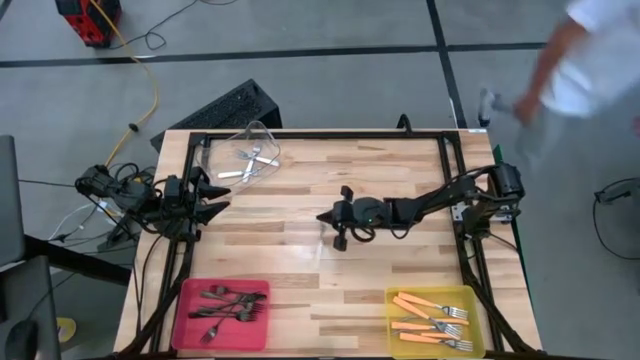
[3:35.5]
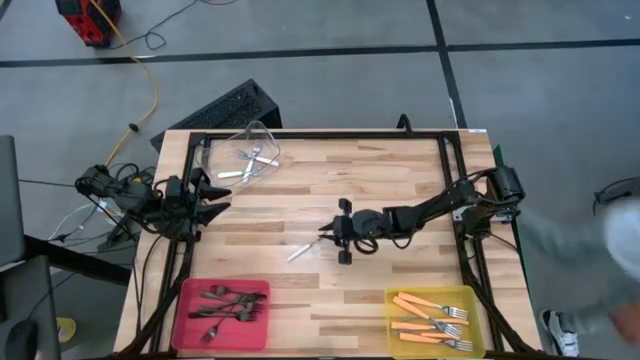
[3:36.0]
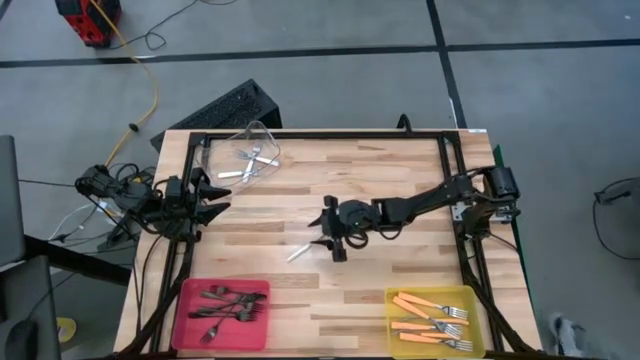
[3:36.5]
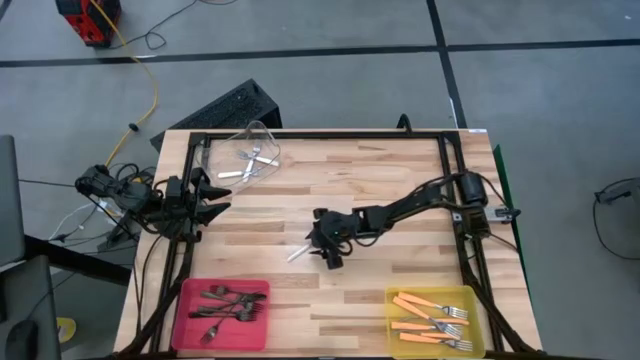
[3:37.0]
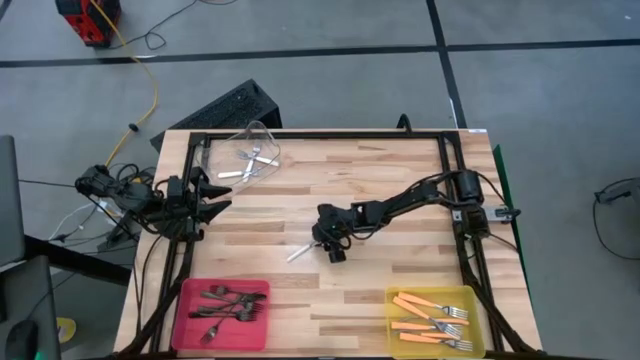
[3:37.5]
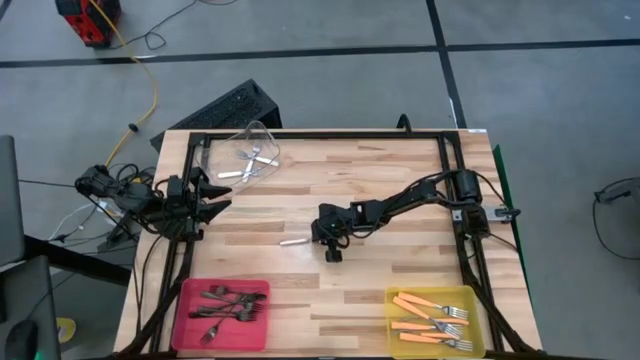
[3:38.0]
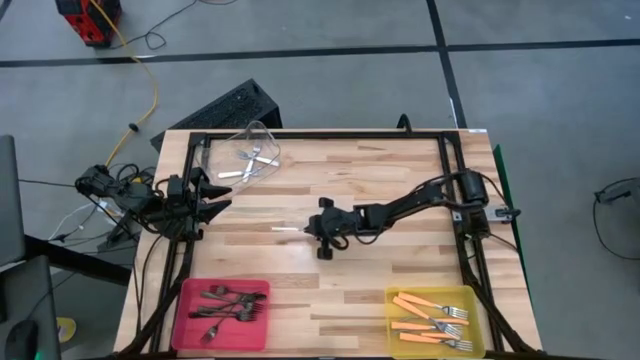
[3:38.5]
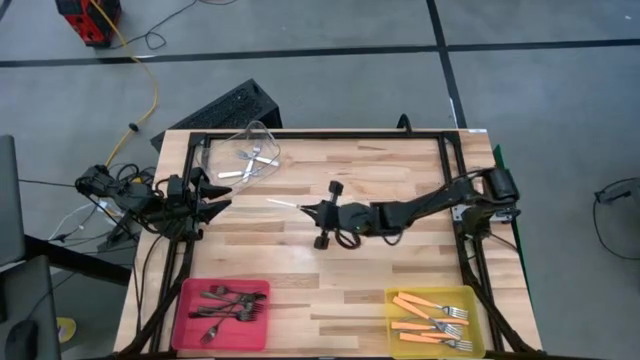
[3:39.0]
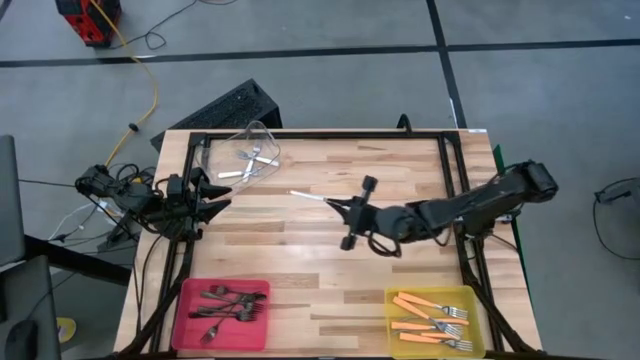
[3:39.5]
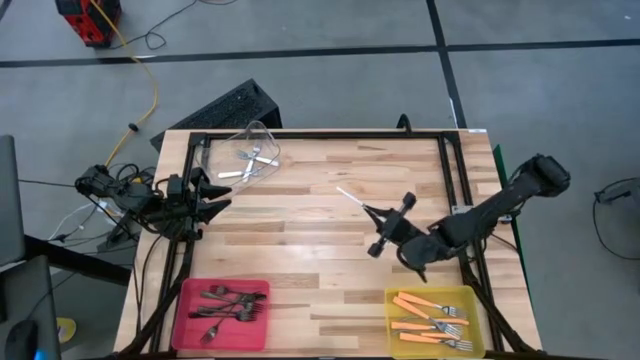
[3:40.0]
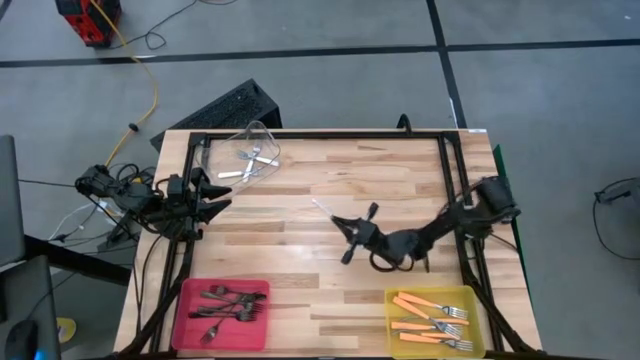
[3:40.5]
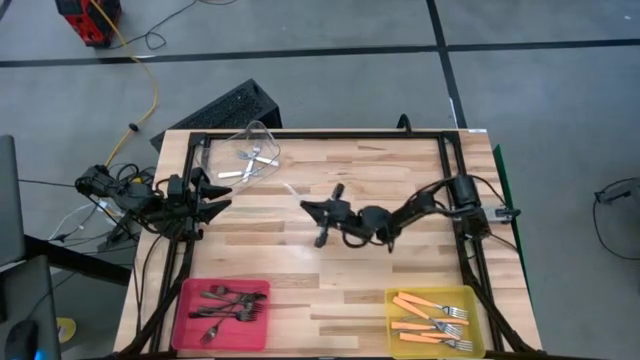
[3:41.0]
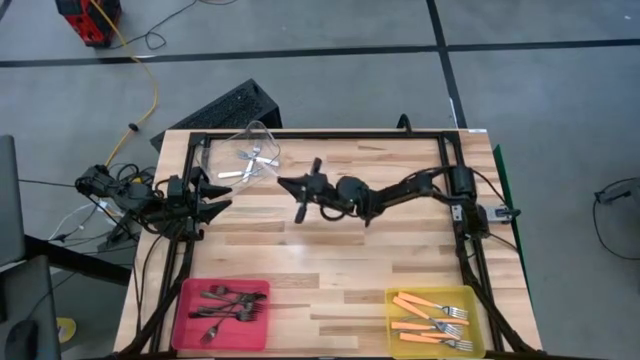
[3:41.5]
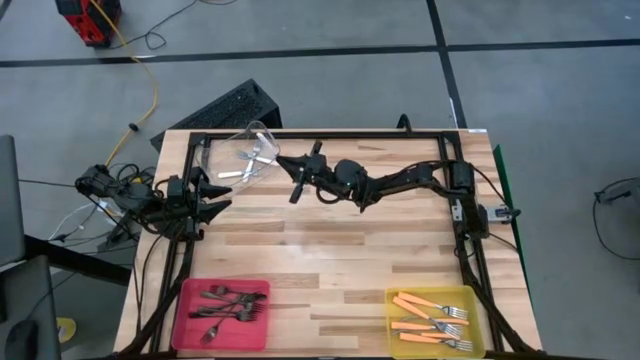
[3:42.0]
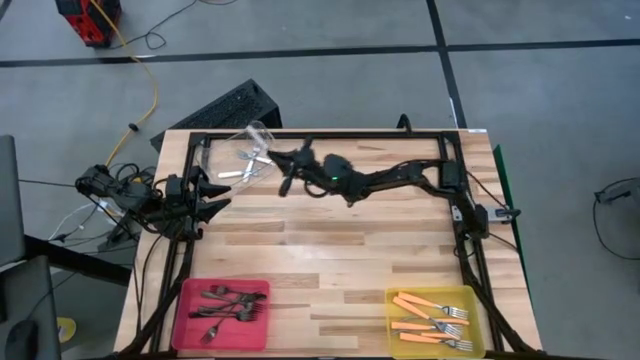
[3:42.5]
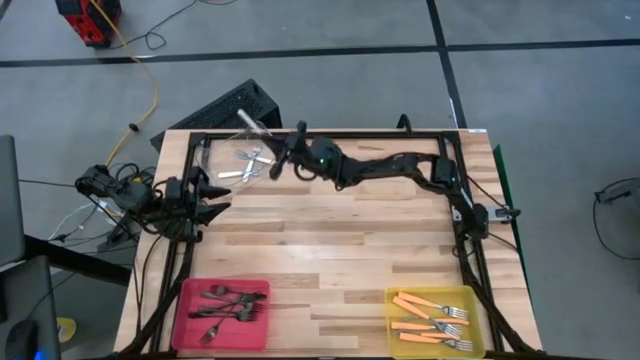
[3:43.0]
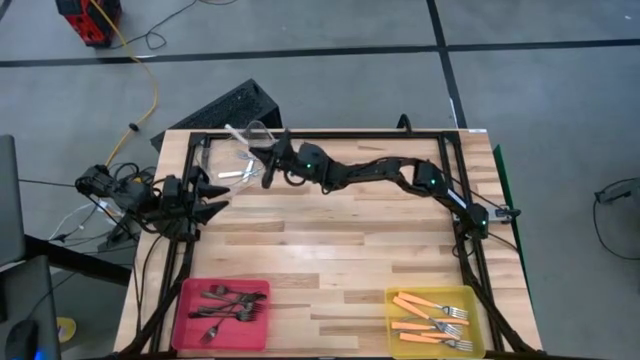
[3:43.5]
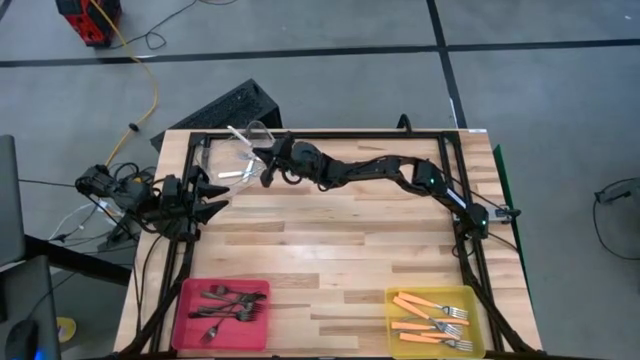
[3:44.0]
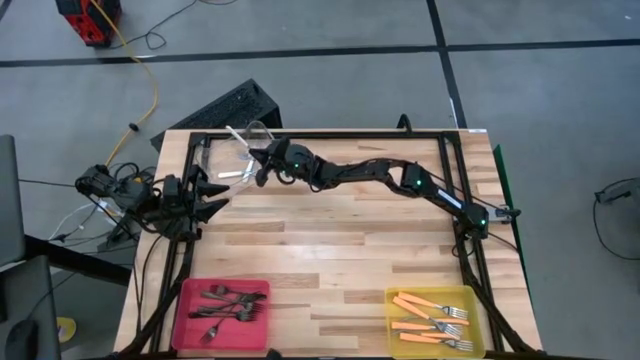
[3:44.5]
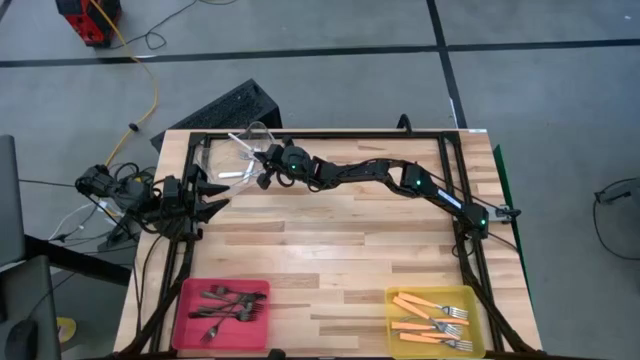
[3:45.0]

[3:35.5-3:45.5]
Task: Sort silverware by color (type)
Put the white fork into the transparent bin

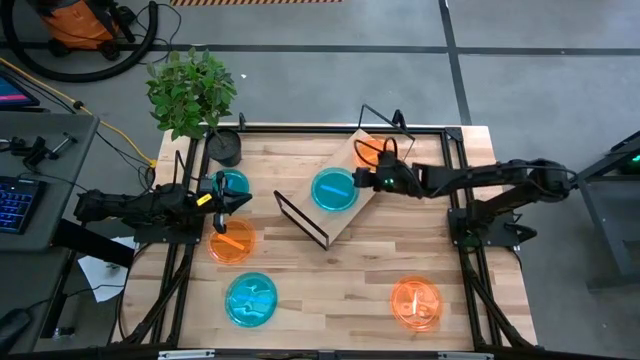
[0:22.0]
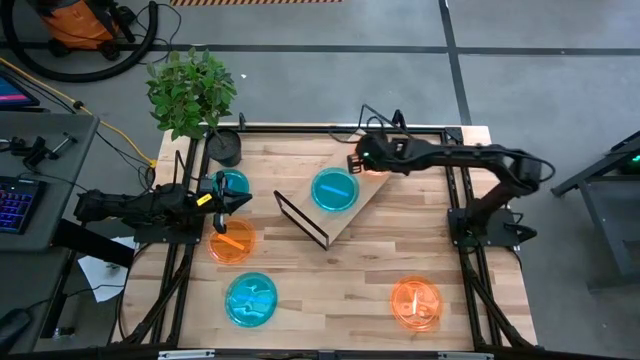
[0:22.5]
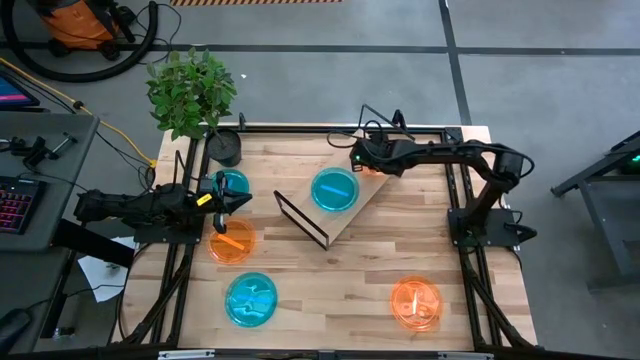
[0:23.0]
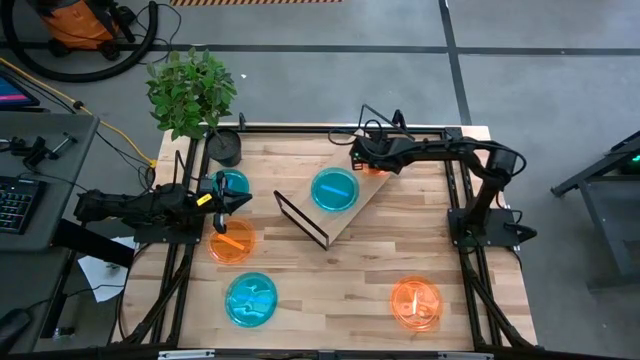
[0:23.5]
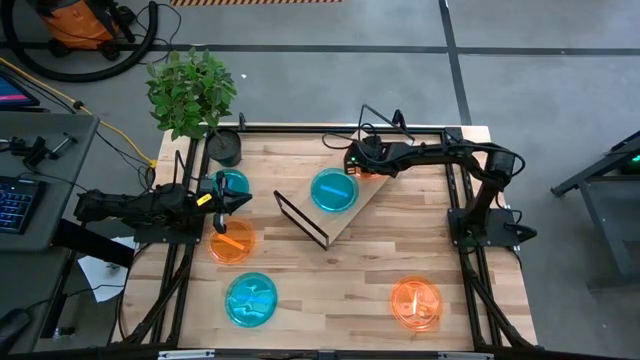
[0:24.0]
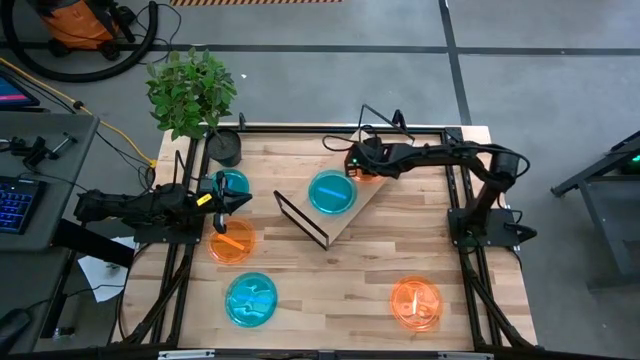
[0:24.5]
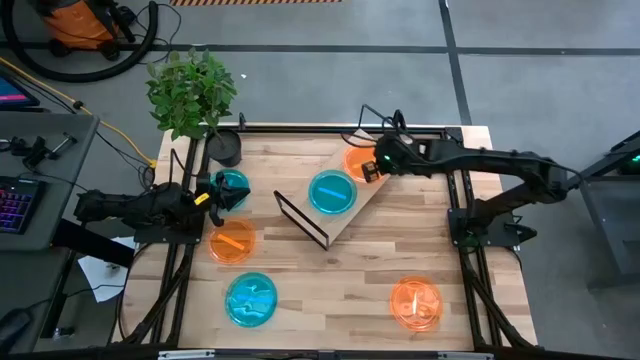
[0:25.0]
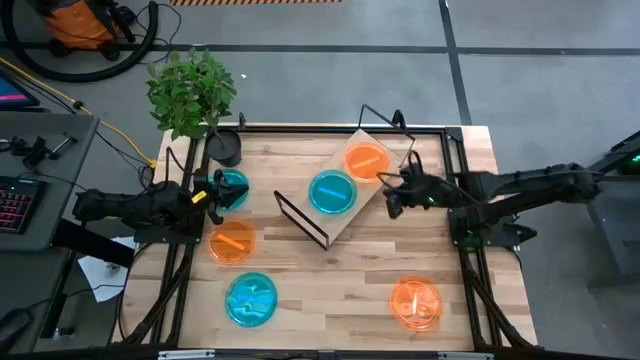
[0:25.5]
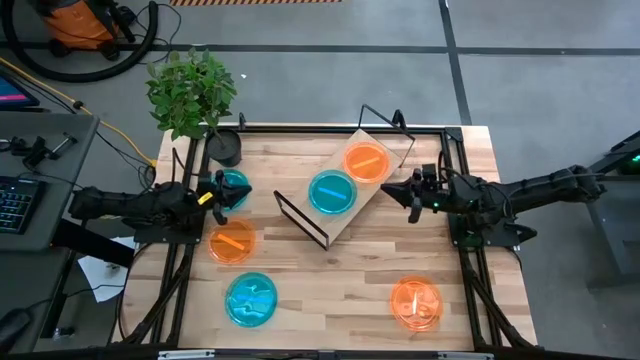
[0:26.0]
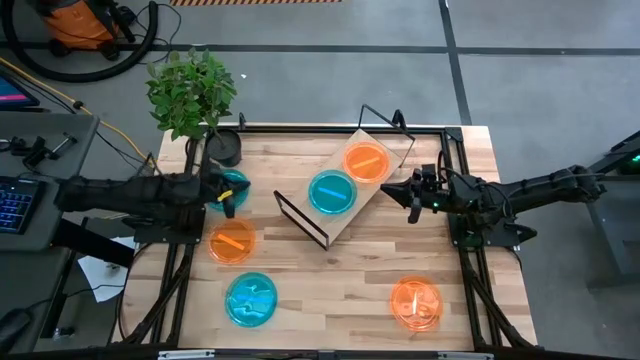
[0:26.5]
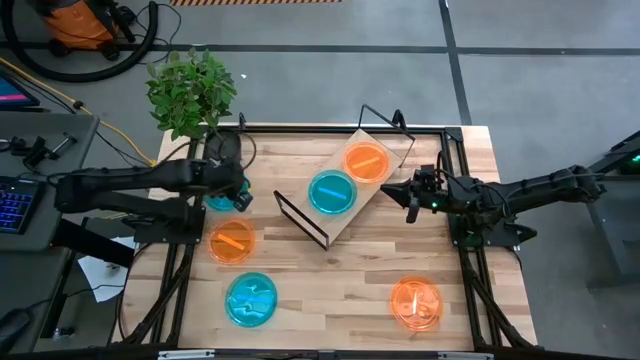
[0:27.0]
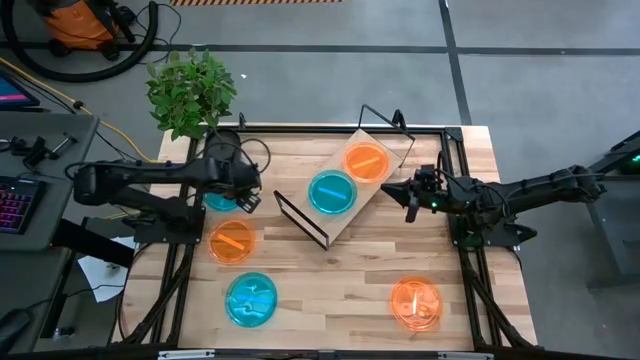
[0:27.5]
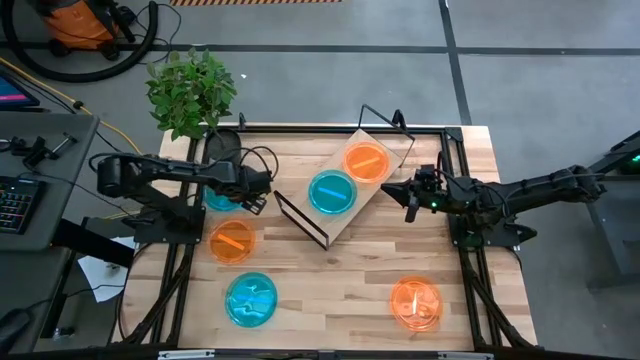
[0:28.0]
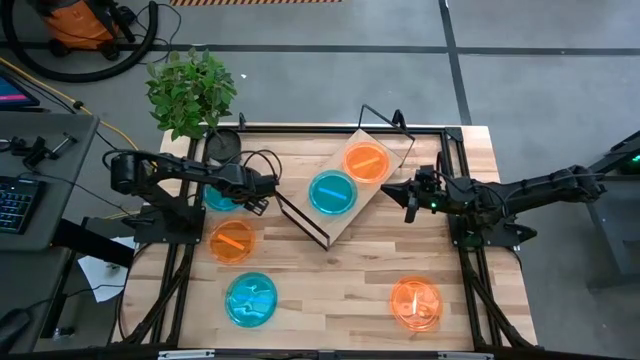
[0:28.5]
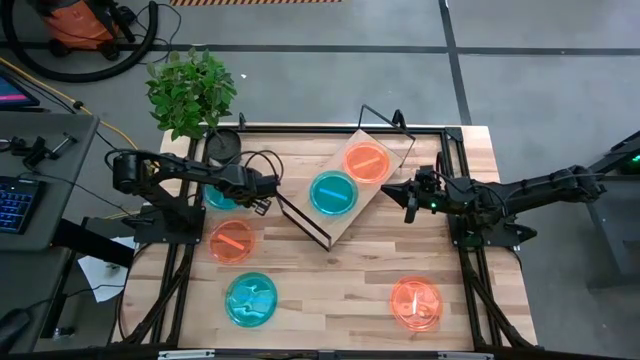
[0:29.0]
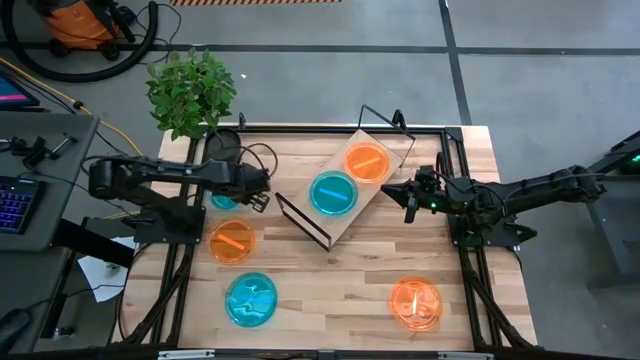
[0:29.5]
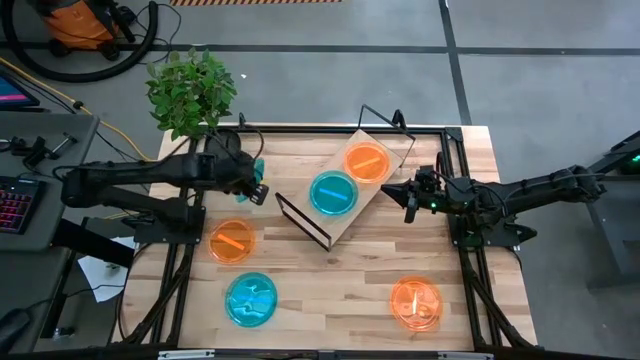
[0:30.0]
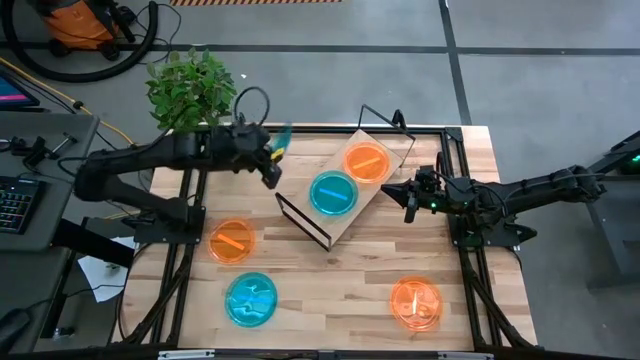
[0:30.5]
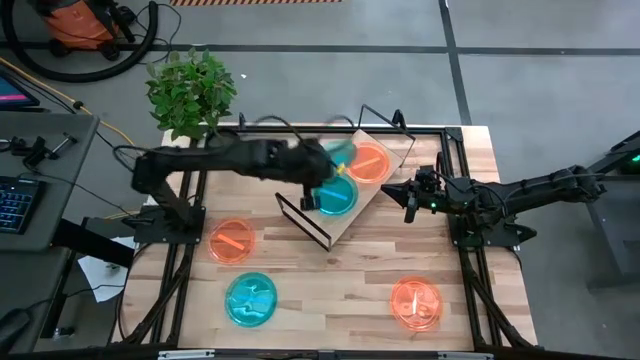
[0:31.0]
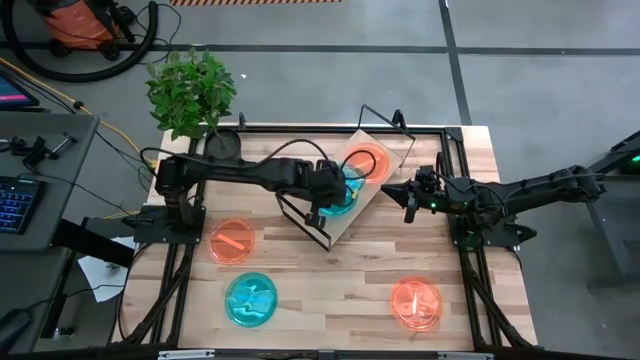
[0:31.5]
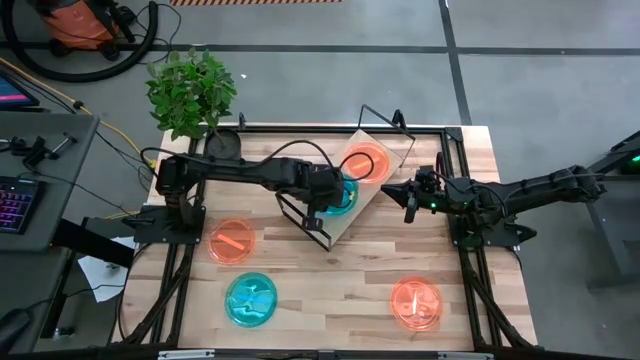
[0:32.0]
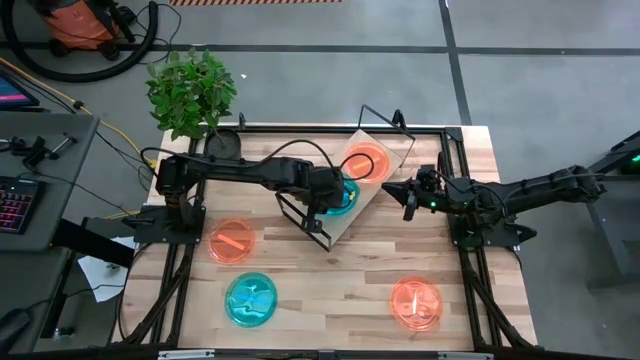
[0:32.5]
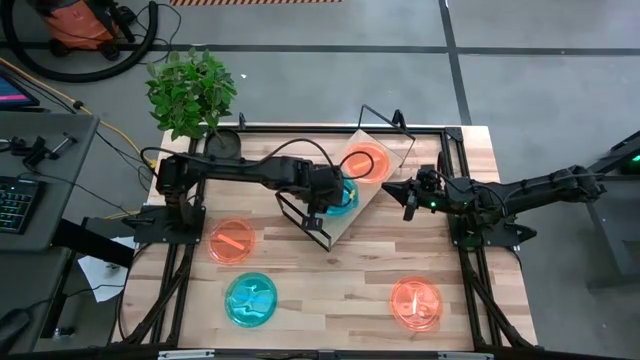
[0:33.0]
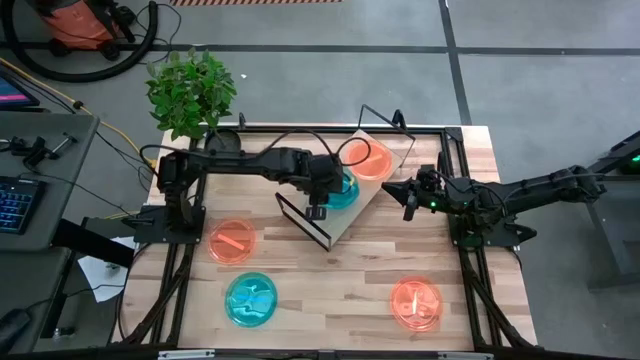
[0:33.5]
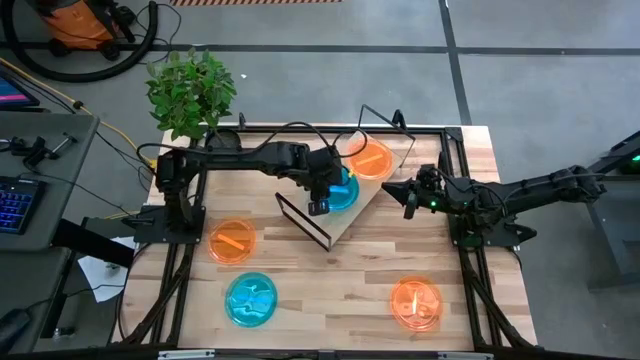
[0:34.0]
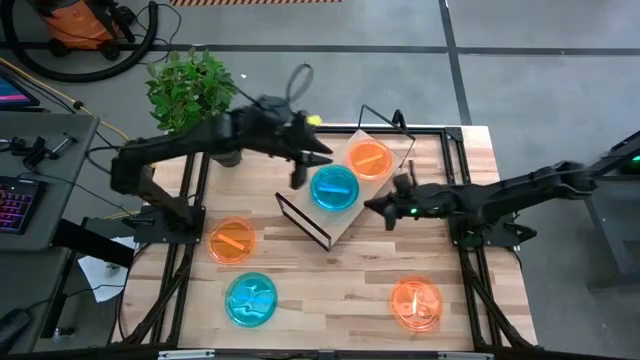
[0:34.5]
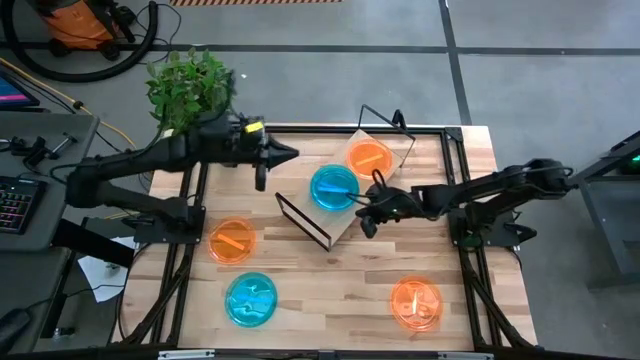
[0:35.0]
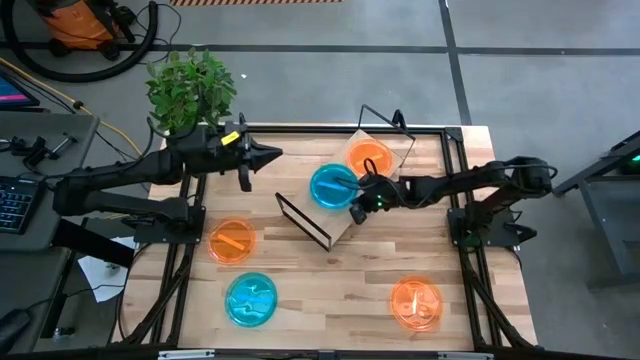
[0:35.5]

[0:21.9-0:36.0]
Task: Place and stack plates onto a shelf
Stack the top blue plate on top of the blue plate on the shelf
